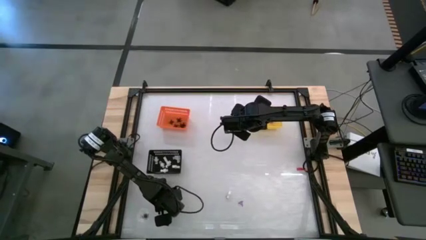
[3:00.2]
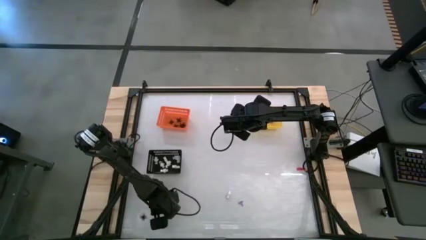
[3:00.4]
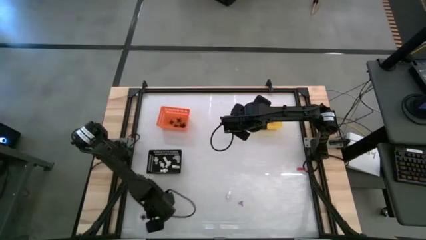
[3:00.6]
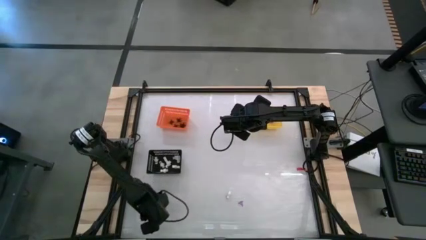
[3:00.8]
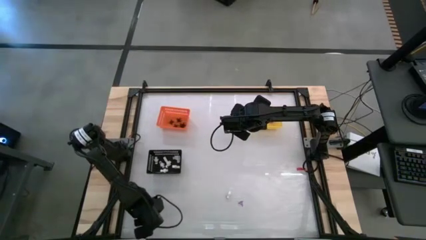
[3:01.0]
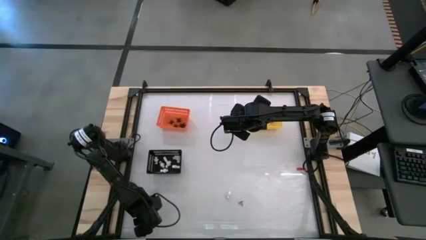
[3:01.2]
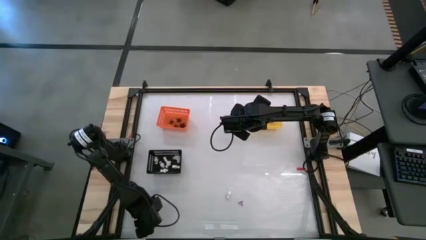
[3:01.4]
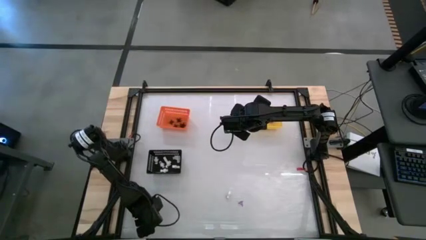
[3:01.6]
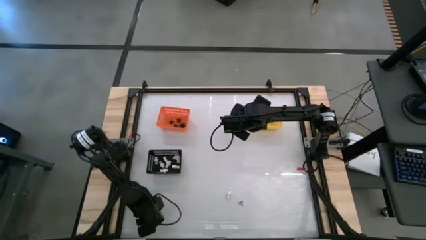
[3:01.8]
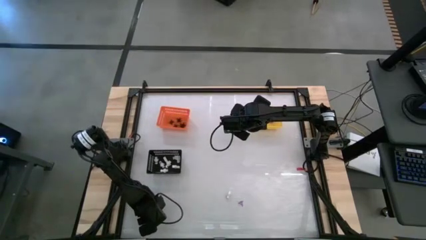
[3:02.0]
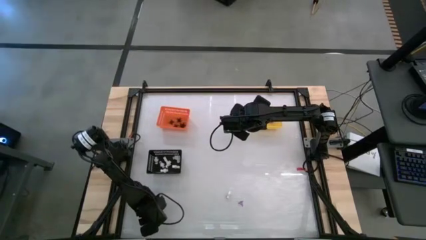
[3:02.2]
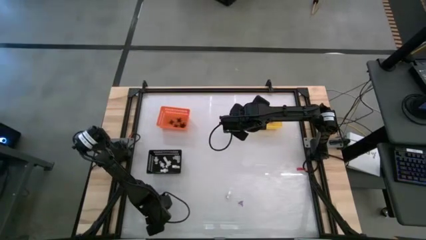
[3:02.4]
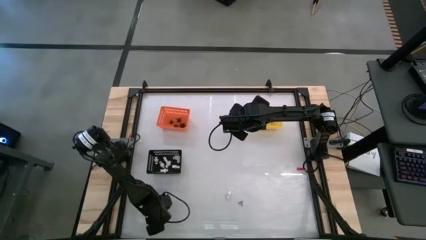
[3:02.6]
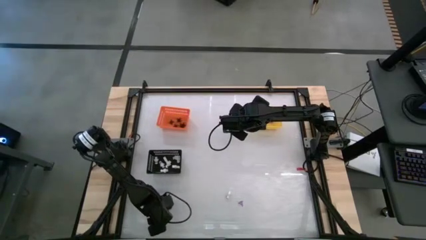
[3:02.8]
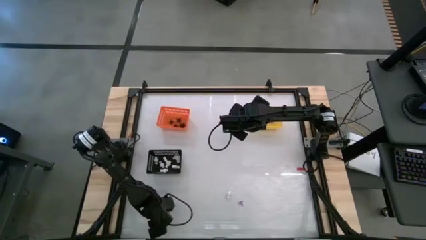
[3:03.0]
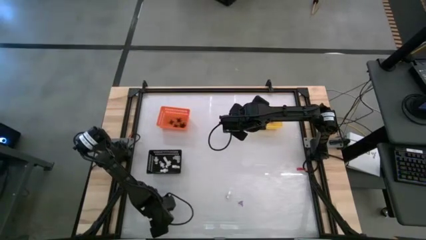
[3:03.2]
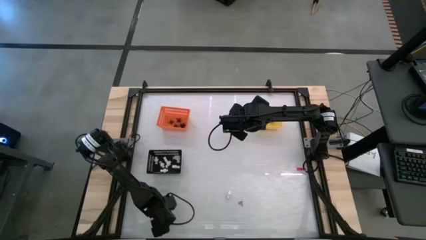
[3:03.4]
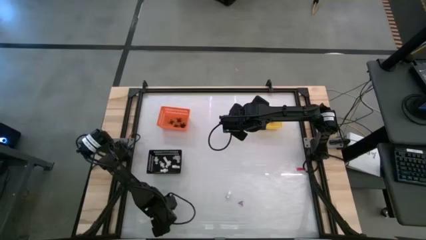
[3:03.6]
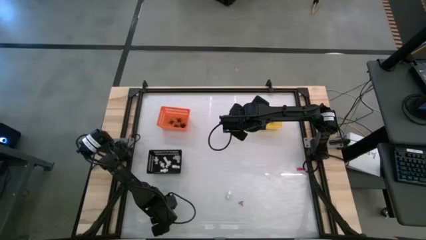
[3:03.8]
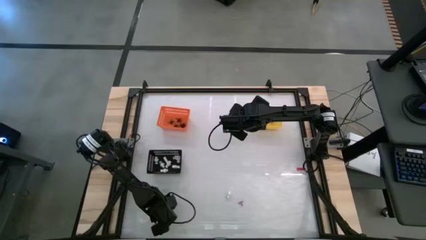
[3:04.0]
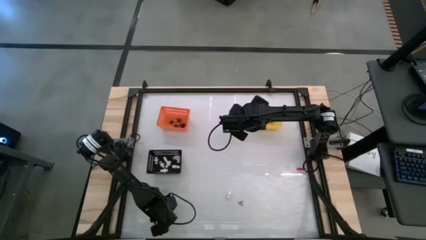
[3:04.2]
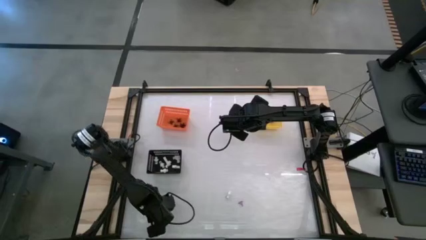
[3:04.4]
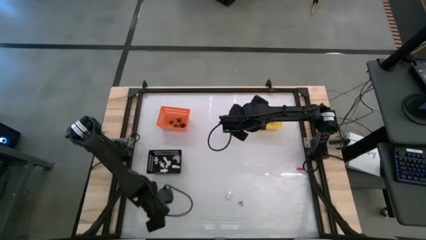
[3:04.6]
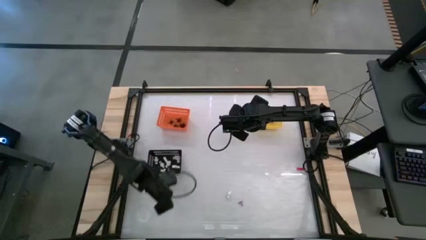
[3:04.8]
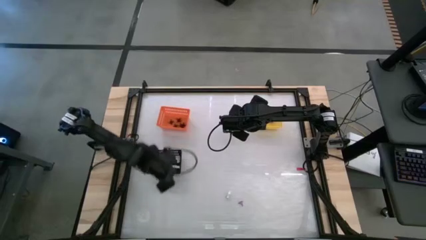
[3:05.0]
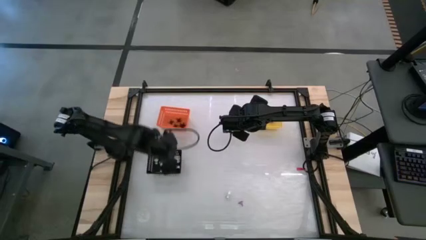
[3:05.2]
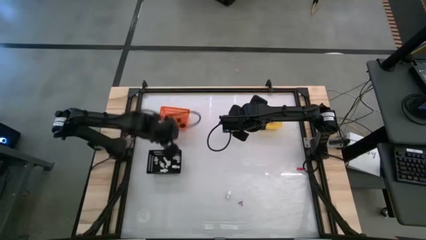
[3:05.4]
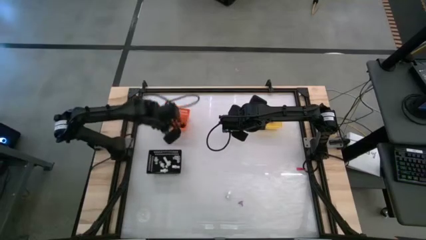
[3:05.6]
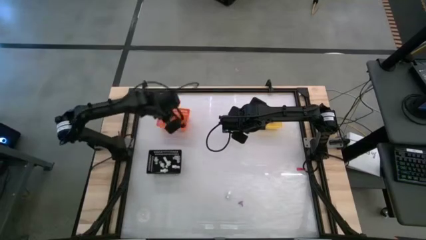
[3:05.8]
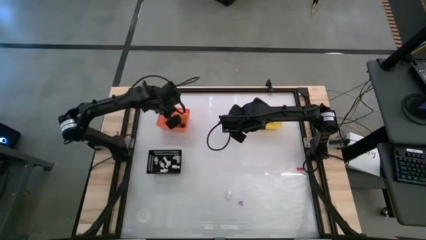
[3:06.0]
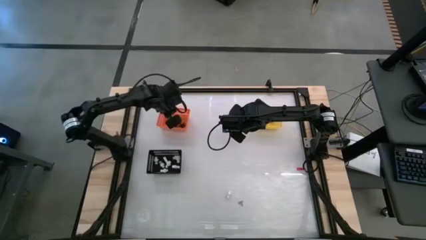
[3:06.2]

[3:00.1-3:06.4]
Task: Sort Halloween decoration
Put the black spider toy into the orange bin

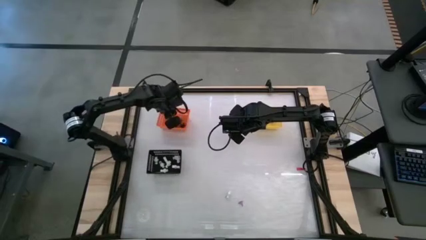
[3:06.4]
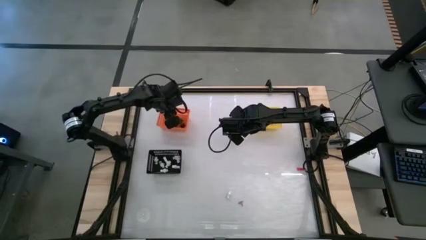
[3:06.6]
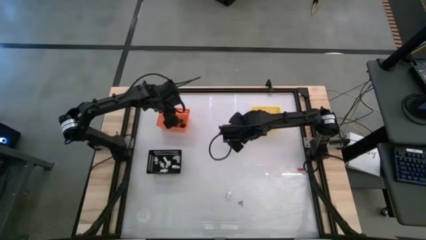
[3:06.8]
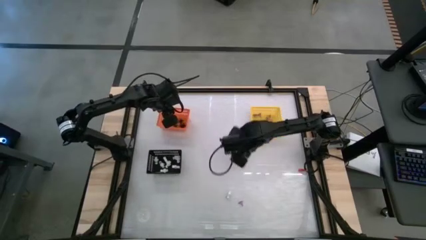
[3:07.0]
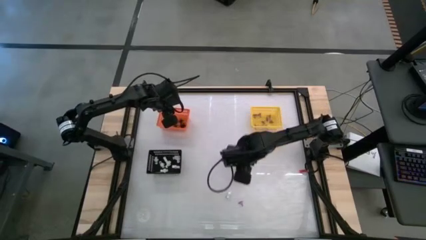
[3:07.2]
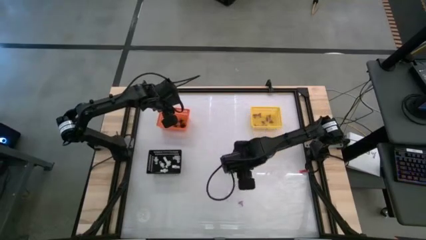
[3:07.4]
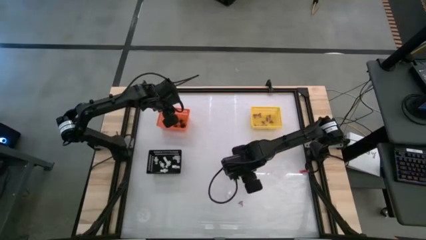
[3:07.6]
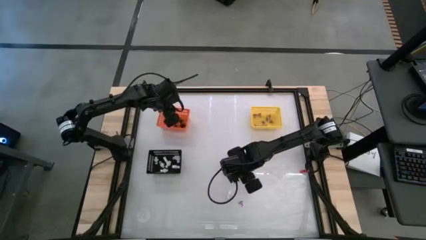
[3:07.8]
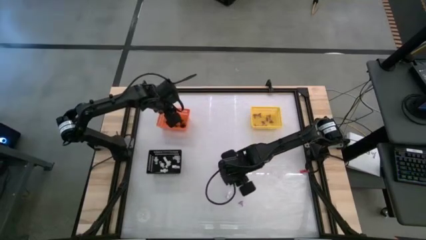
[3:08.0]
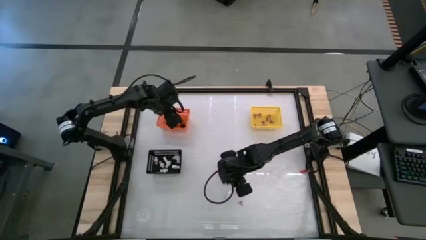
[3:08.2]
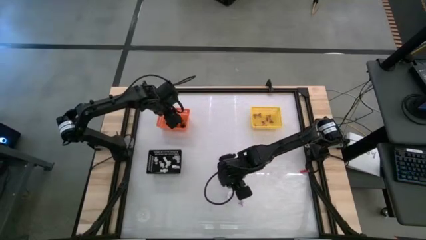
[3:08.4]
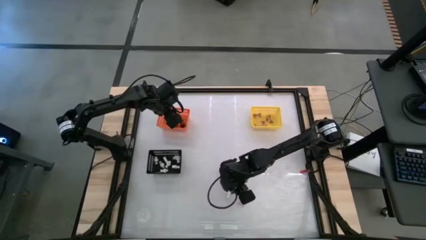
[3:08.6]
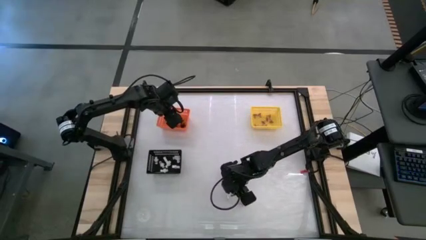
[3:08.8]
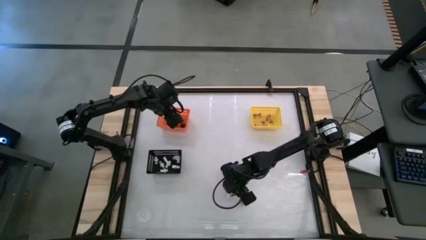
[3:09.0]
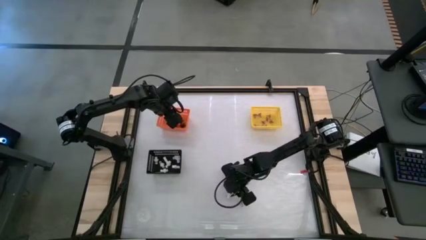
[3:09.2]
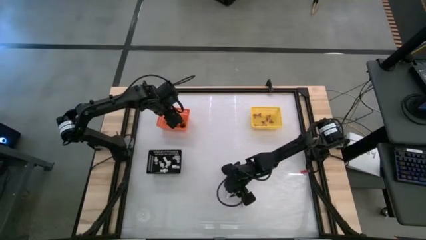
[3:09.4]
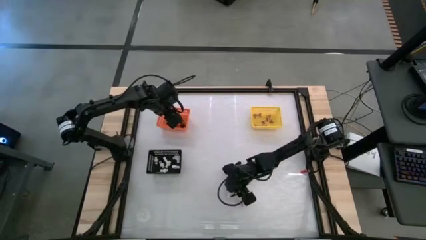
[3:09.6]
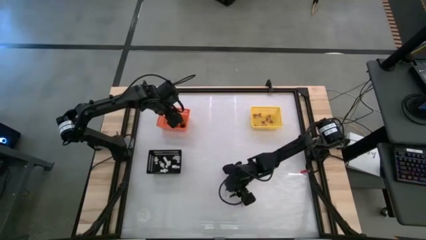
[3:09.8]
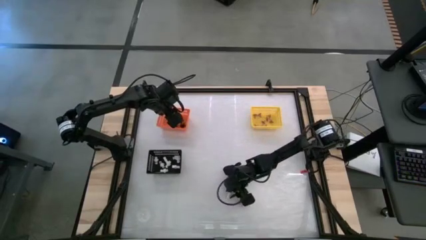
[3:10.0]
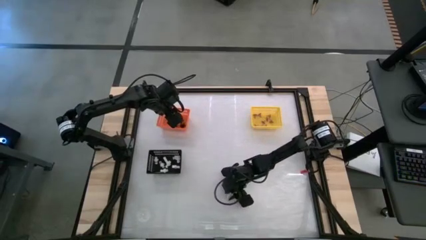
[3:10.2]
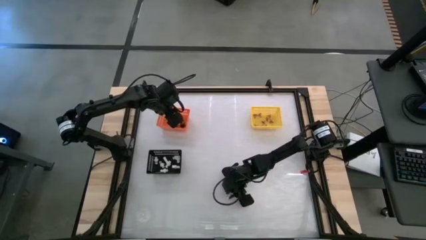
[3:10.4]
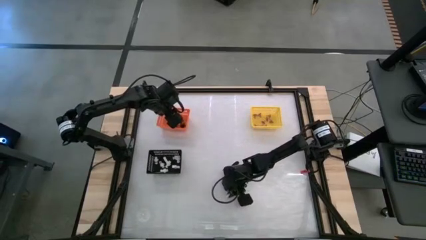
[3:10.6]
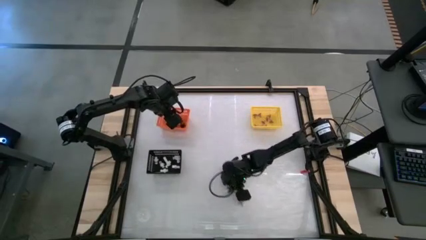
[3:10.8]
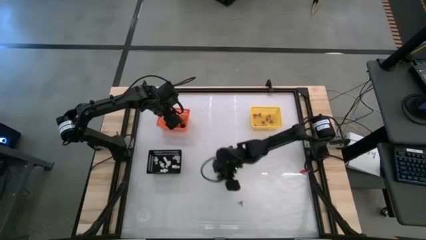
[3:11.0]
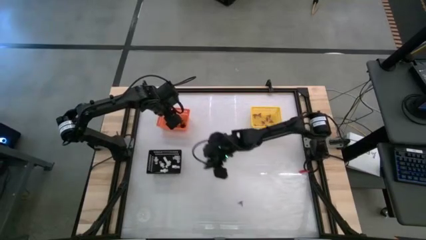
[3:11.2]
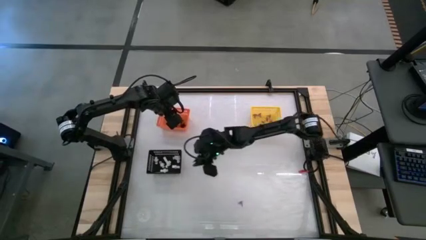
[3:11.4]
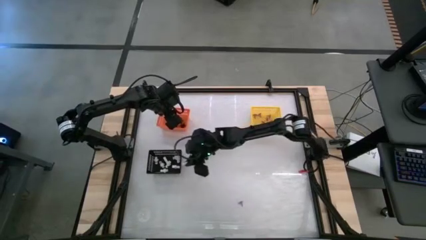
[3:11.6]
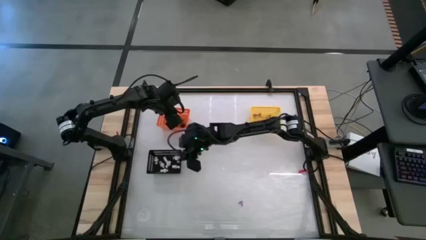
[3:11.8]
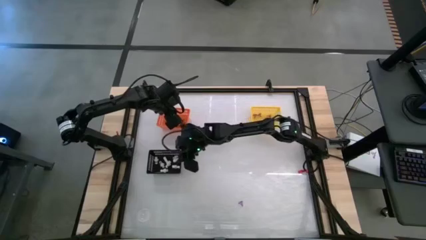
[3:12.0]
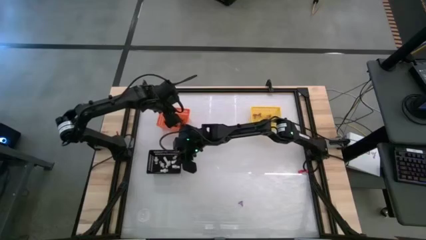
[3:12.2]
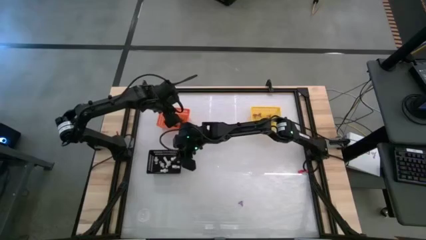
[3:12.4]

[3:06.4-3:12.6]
Put the white skeleton toy into the black bin

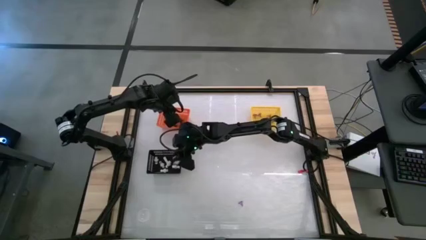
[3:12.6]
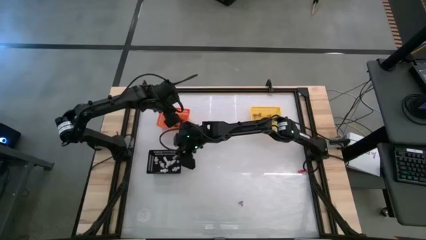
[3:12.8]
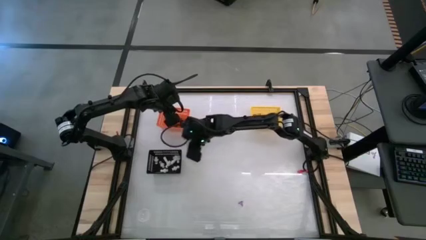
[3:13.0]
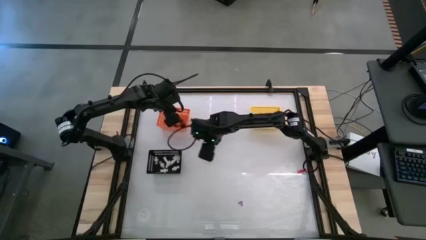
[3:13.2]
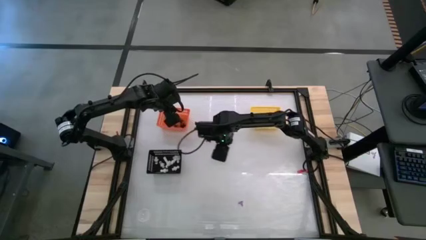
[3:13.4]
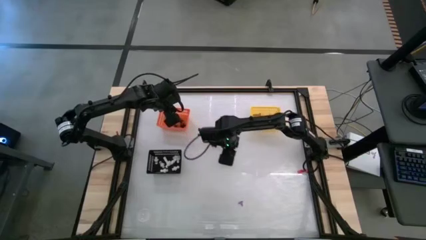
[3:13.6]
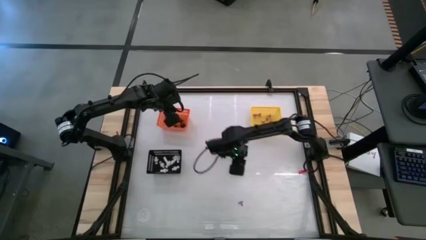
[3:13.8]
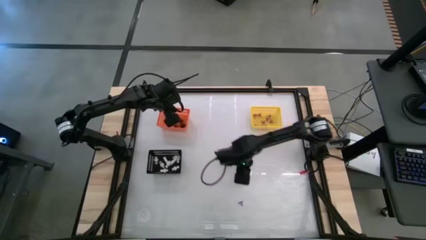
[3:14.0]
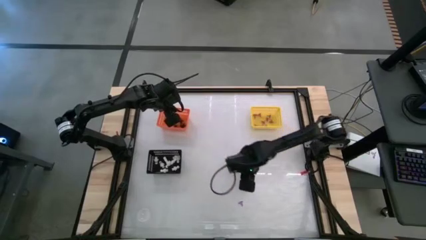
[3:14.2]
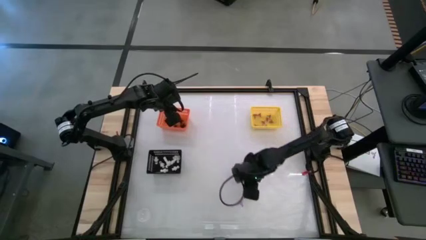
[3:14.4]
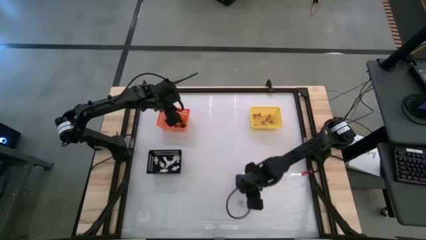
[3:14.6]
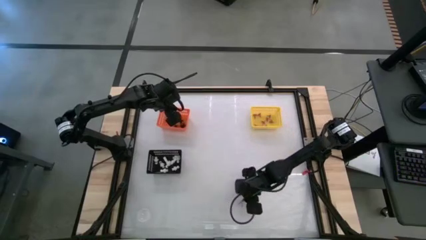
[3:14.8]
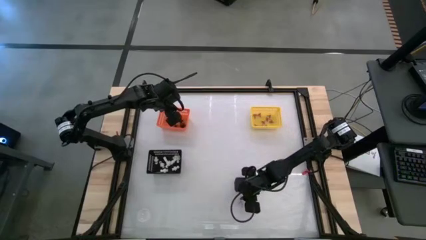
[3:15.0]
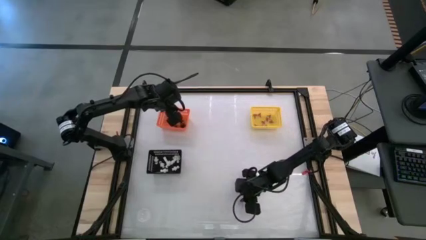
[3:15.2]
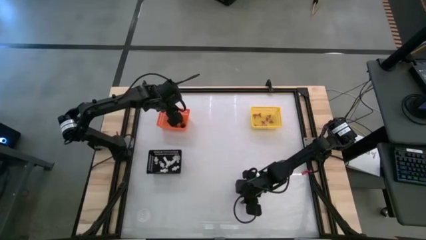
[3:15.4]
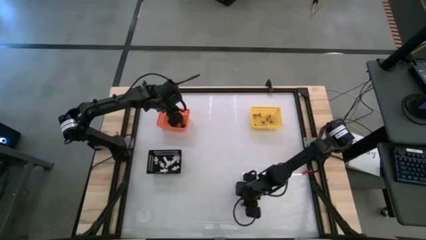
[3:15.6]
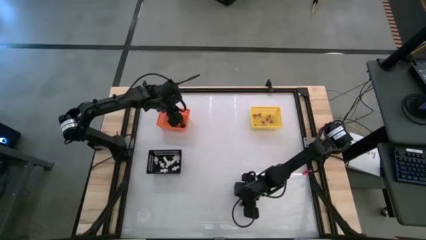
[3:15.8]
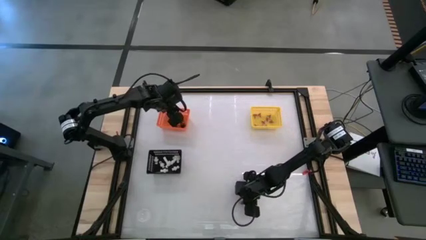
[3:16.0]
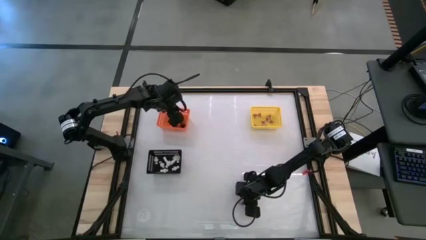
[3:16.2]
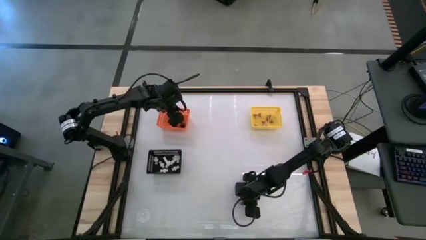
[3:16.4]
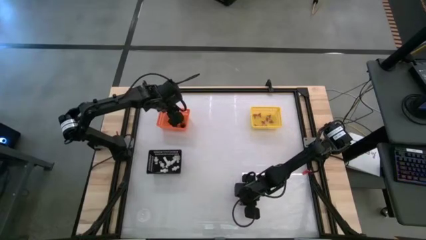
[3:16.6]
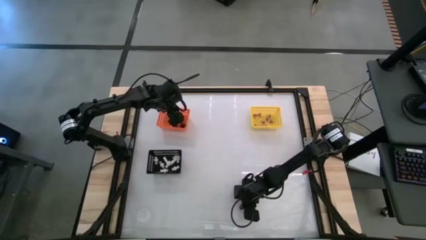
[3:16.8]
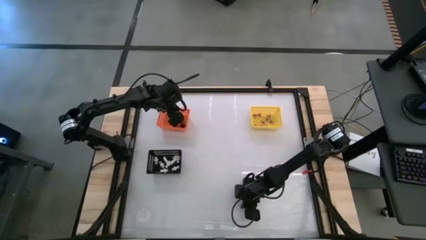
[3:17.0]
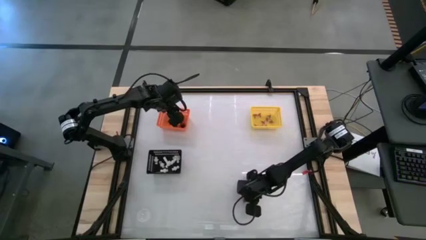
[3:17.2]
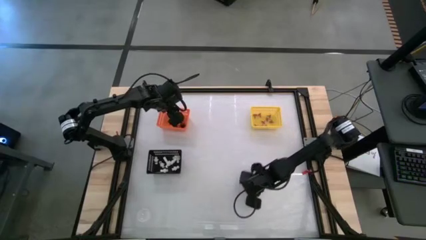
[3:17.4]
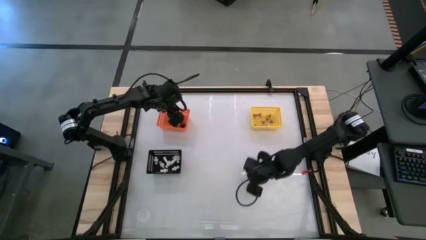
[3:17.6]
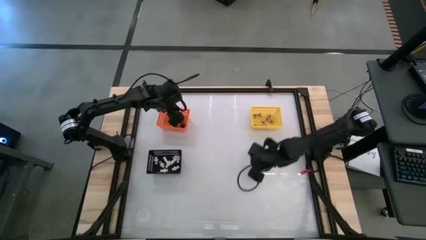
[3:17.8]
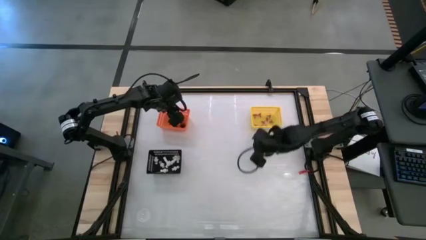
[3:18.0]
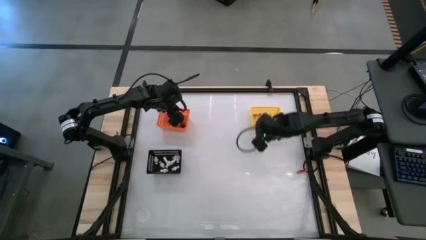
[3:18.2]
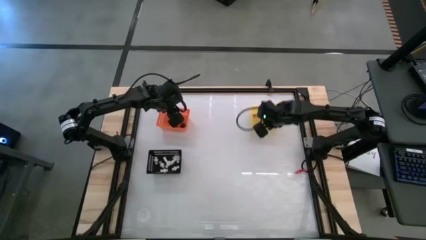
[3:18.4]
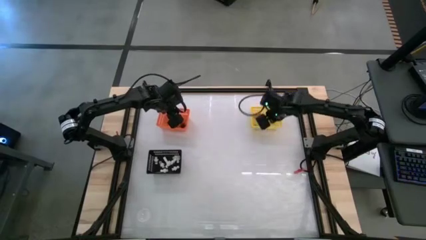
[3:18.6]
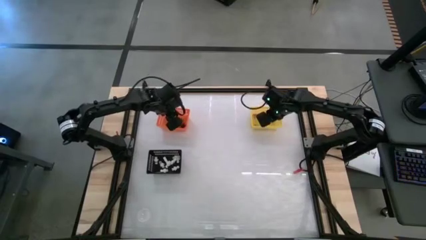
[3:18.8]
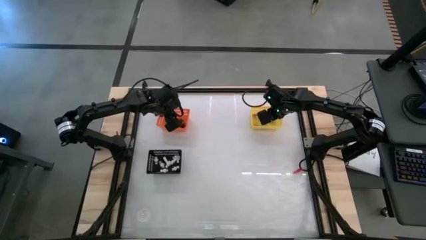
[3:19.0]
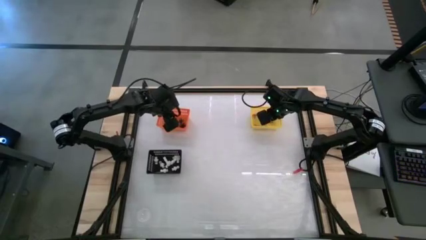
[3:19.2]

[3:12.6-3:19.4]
Put the violet witch hat into the yellow bin
